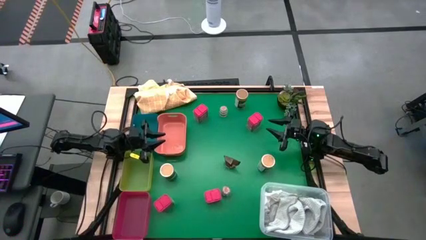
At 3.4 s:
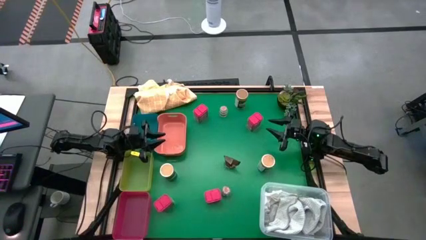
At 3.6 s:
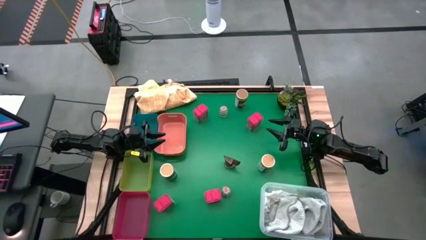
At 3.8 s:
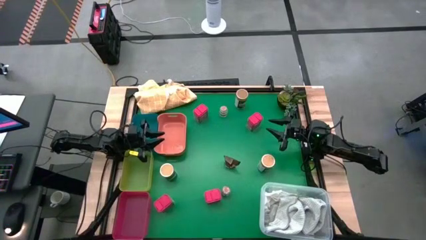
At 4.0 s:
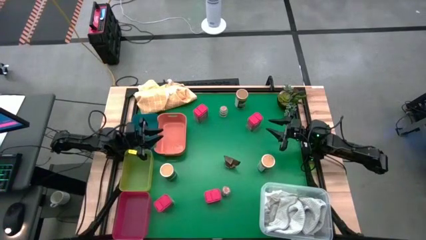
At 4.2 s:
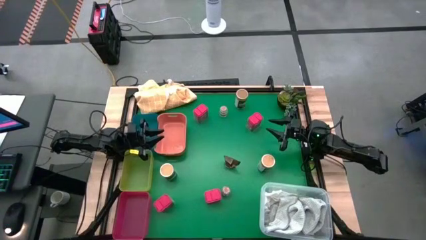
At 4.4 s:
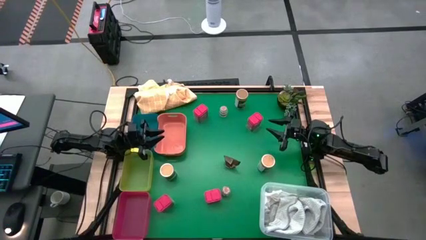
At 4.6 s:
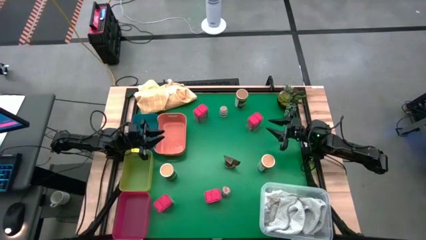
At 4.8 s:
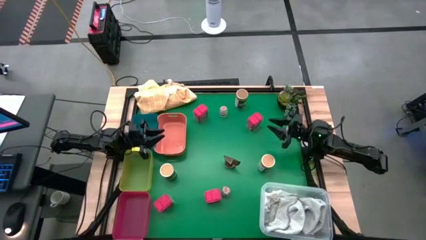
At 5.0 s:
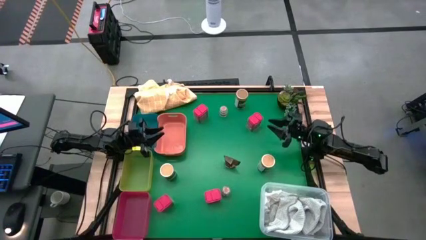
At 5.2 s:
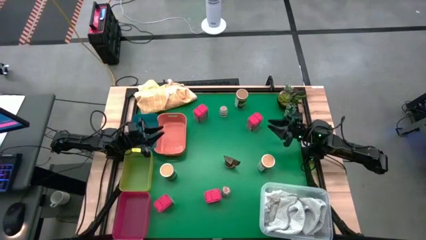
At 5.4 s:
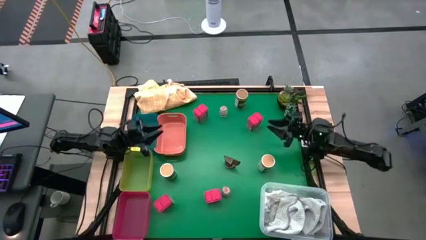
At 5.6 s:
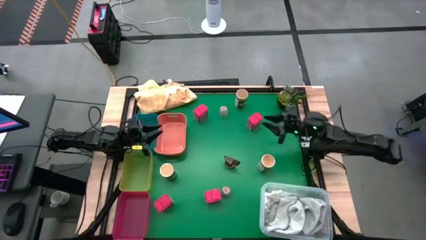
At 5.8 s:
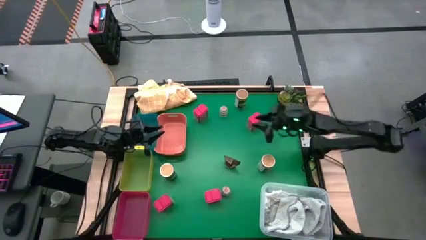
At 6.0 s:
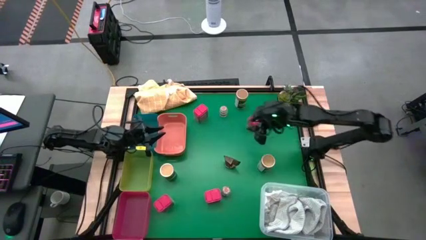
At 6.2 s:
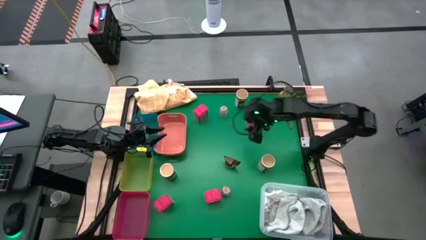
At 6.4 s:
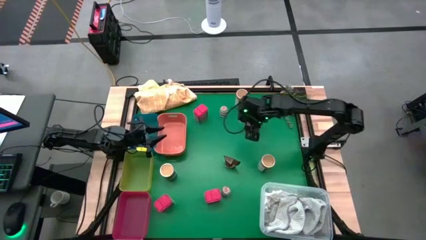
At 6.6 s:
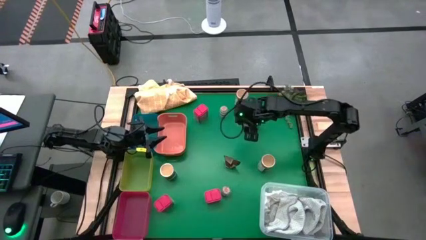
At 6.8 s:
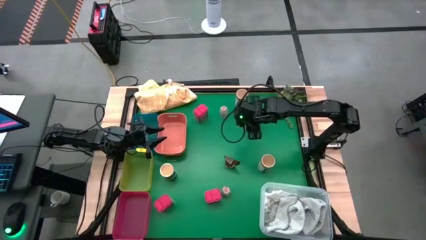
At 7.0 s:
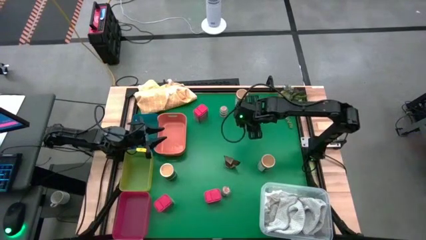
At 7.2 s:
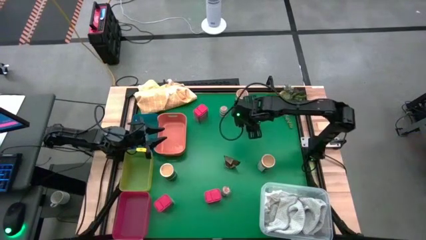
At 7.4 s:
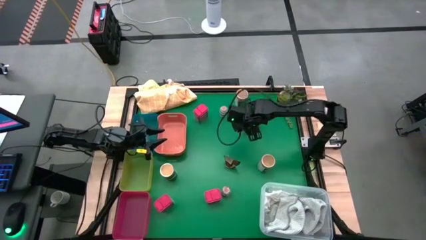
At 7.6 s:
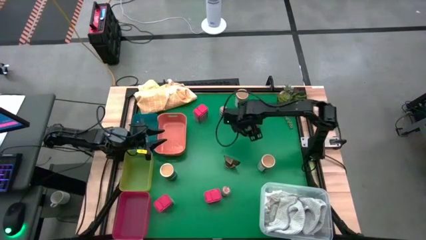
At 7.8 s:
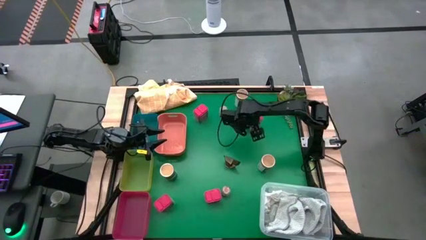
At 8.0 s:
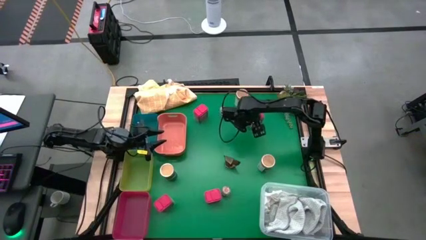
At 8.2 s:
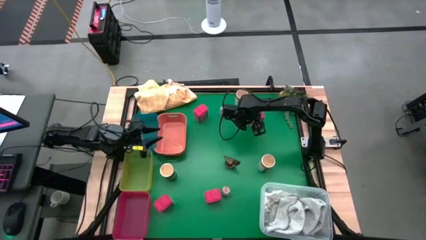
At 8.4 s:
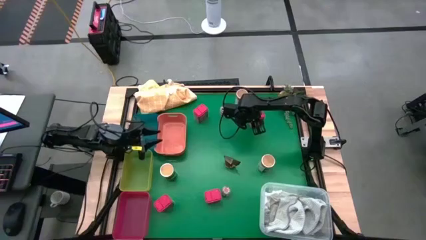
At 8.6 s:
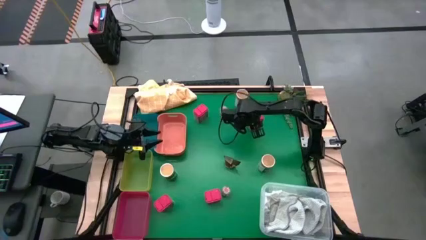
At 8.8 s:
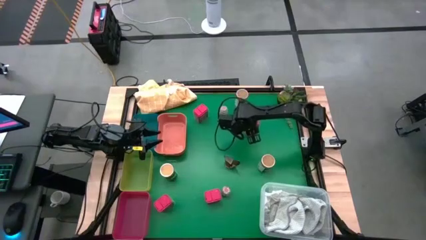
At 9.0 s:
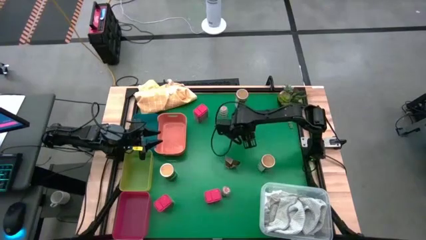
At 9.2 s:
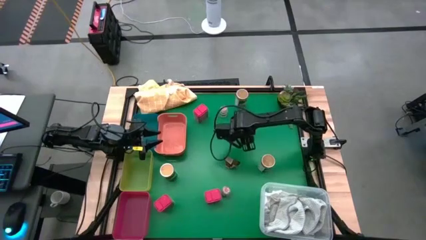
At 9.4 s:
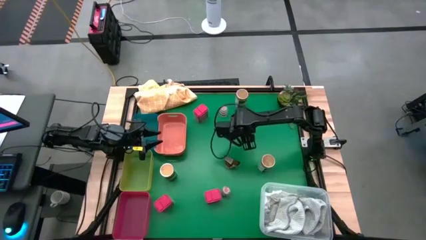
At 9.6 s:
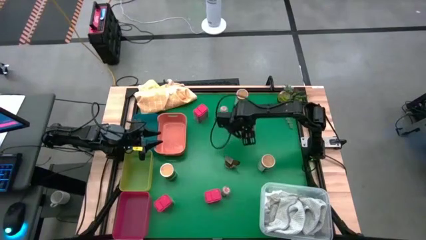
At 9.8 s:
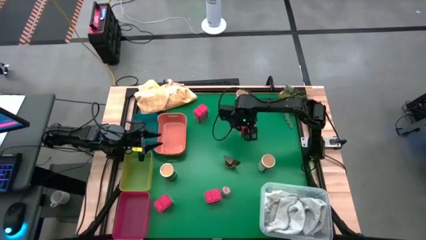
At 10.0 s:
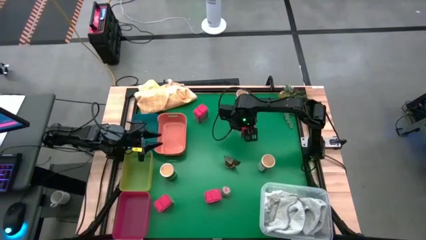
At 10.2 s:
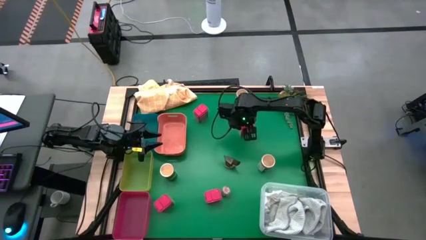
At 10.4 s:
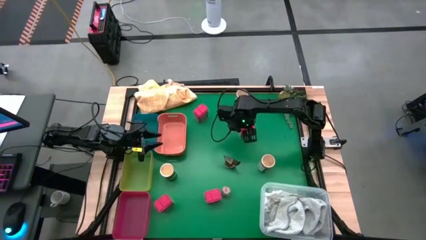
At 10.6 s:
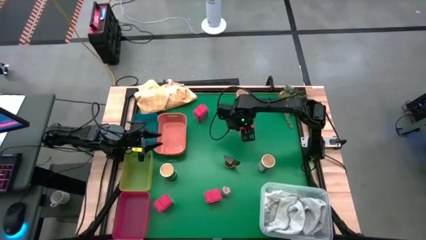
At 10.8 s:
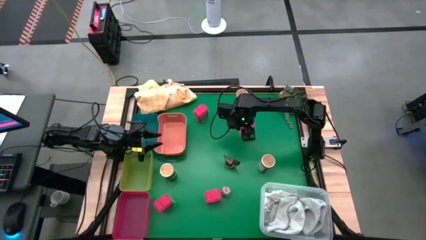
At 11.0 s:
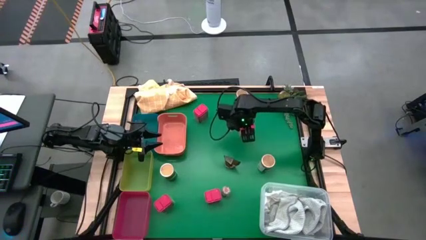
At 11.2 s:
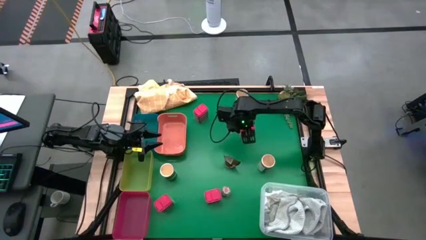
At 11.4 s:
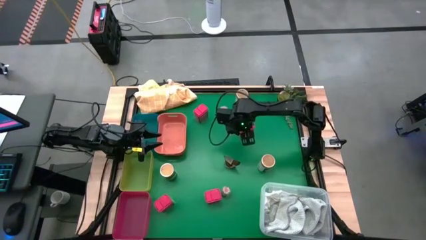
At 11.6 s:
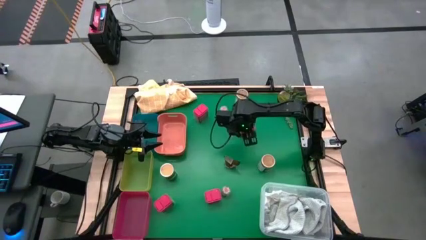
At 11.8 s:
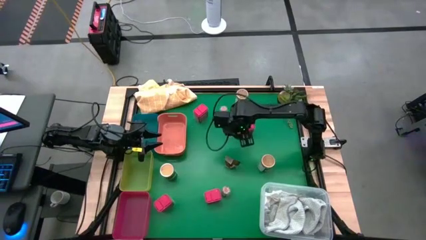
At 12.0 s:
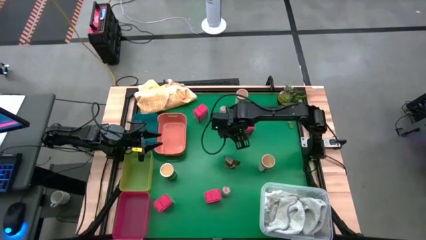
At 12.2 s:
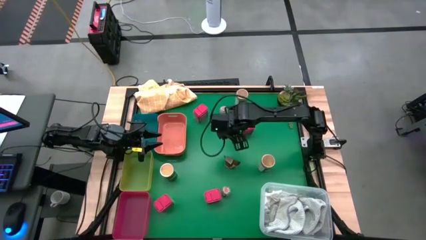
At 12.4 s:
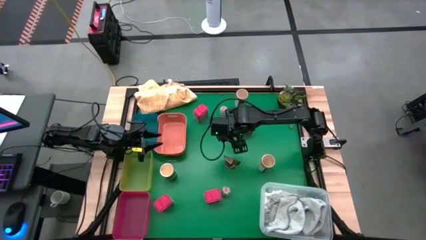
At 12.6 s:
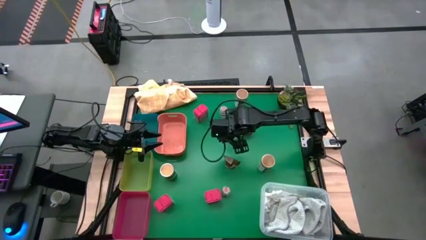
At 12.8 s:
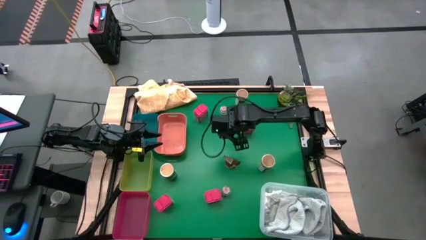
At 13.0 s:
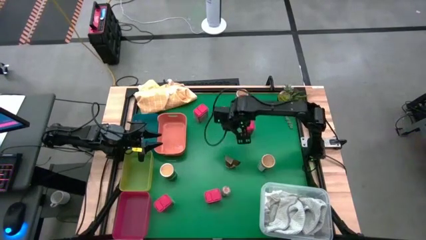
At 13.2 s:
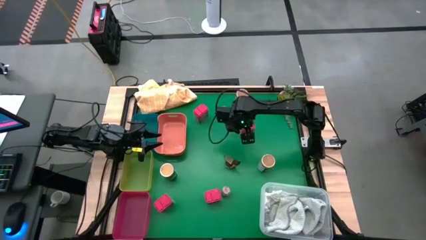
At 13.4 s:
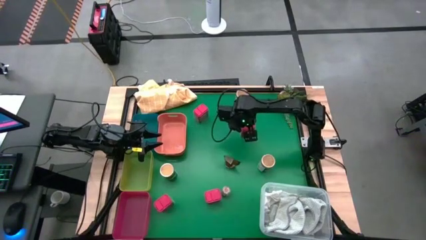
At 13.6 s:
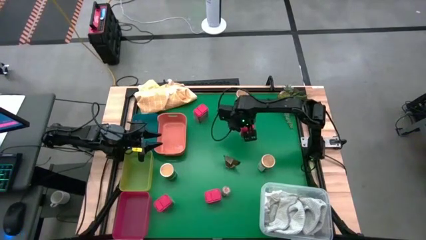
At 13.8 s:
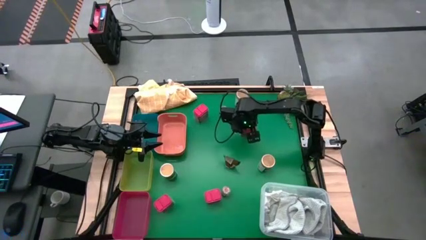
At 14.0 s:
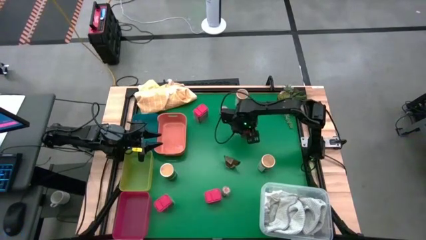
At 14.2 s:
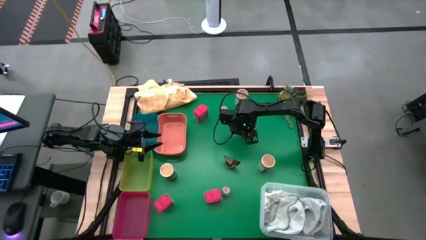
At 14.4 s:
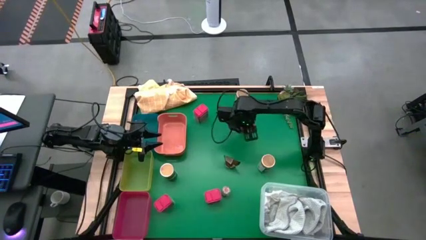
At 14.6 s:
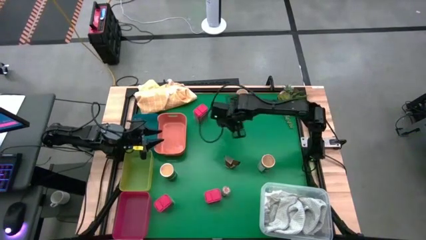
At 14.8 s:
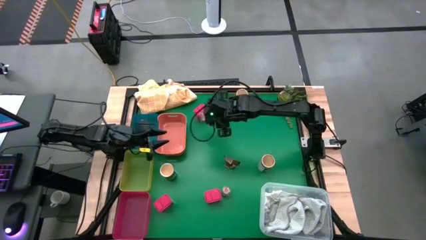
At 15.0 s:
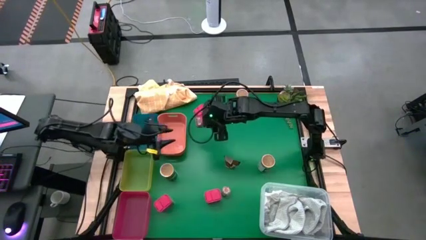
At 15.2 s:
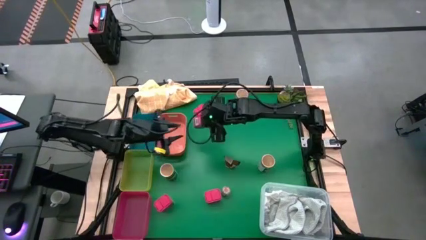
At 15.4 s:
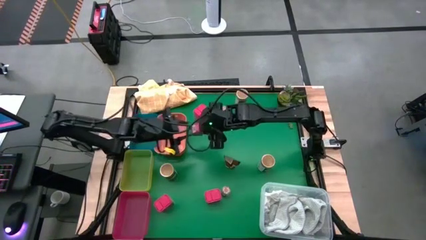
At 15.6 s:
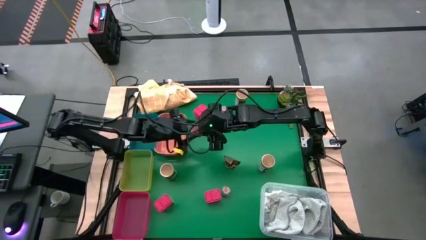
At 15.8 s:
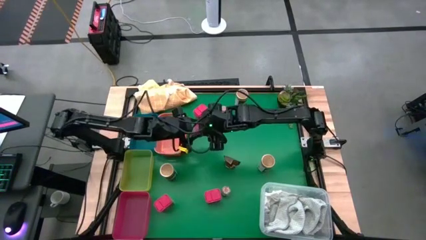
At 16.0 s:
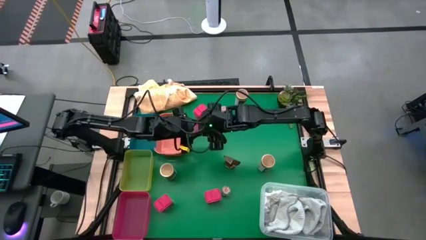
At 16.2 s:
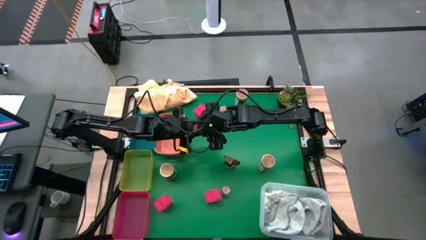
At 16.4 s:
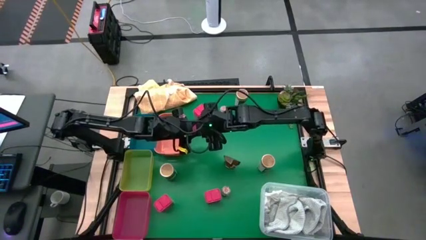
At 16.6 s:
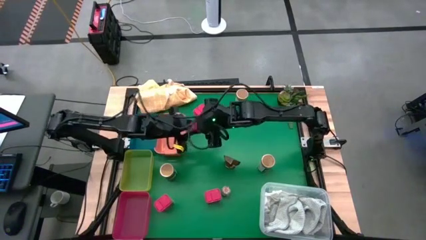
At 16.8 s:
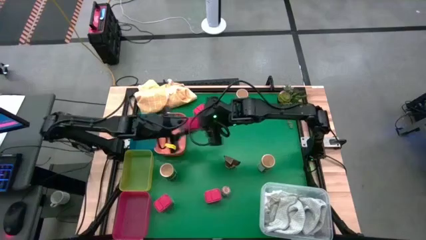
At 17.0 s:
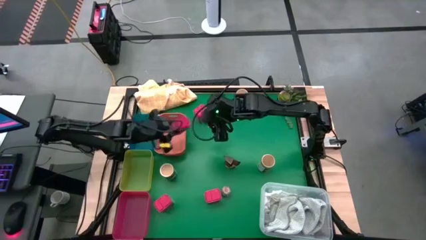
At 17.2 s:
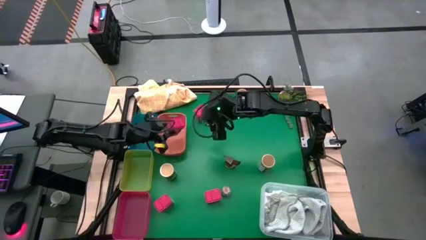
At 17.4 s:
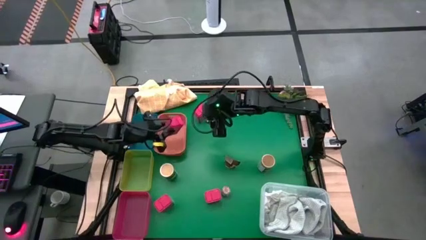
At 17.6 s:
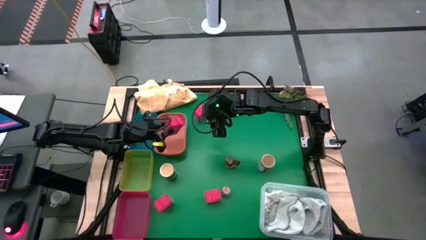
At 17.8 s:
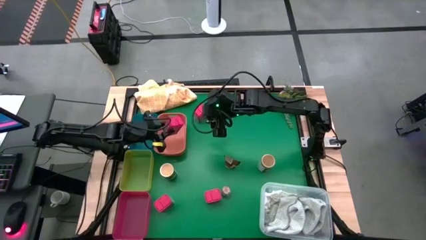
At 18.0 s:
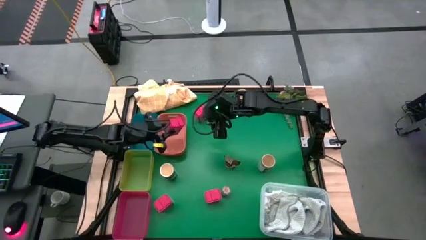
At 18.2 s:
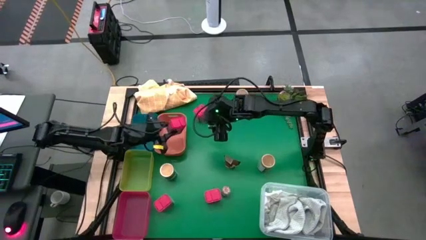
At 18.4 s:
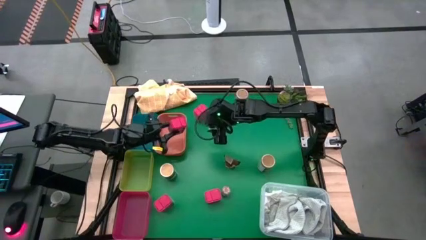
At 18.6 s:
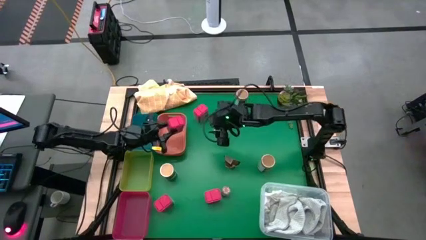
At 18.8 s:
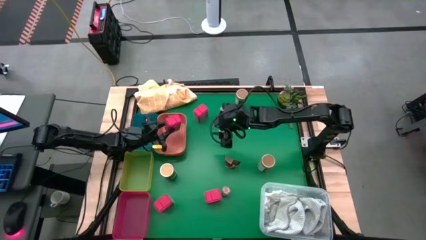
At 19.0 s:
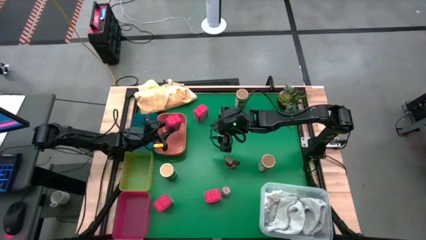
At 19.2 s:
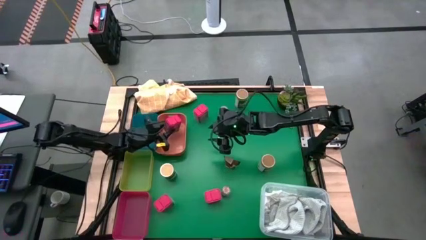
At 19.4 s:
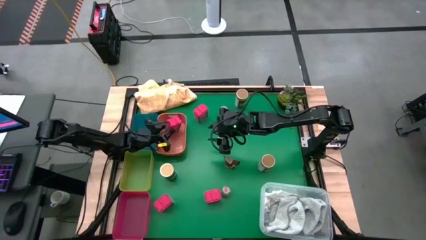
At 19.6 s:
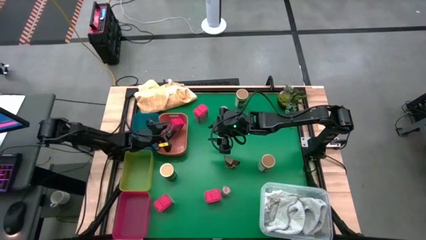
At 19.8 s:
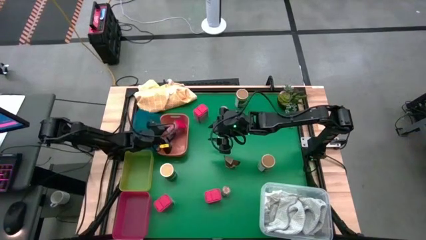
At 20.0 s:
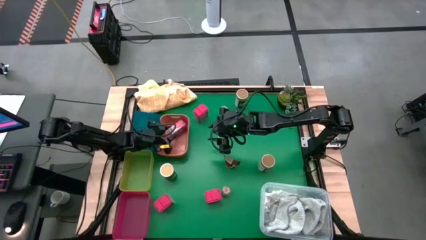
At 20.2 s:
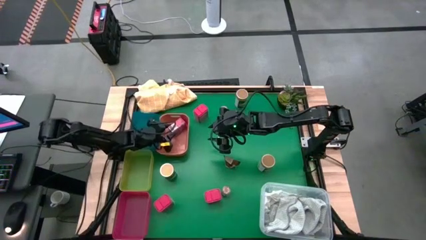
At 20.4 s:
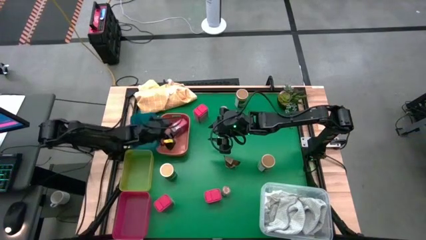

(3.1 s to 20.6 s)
Task: Sort spices by type
Put the top right red seasoning can into the orange bin
